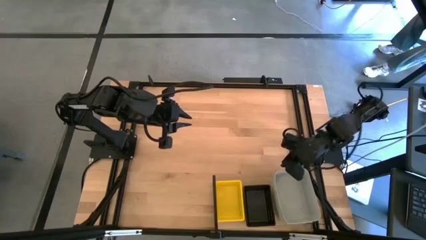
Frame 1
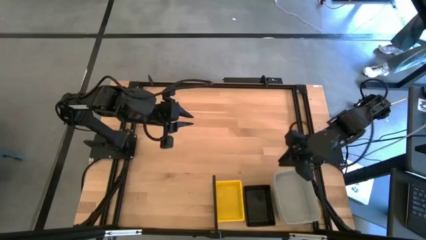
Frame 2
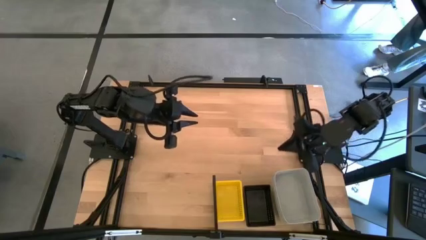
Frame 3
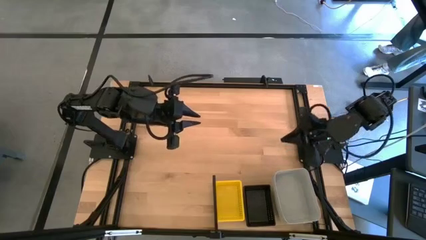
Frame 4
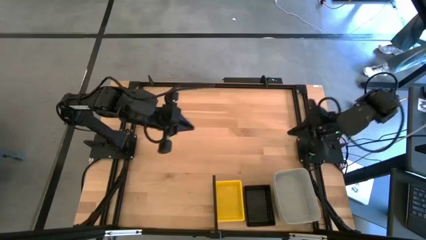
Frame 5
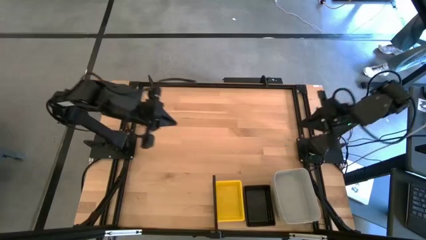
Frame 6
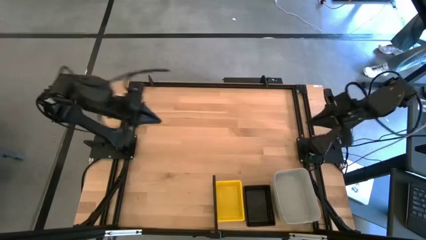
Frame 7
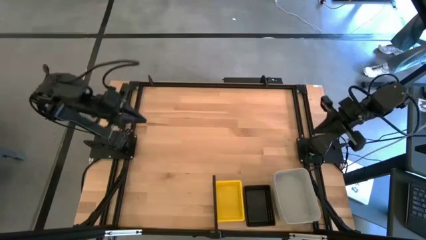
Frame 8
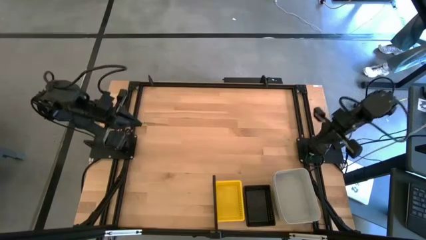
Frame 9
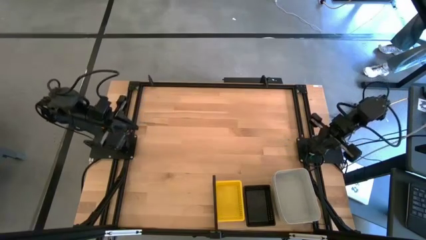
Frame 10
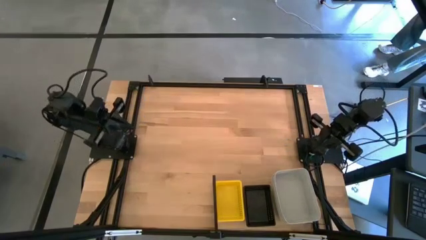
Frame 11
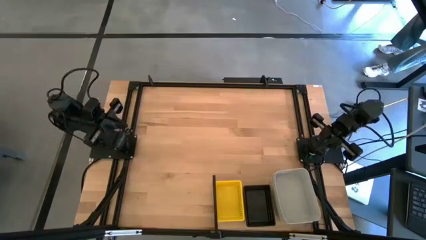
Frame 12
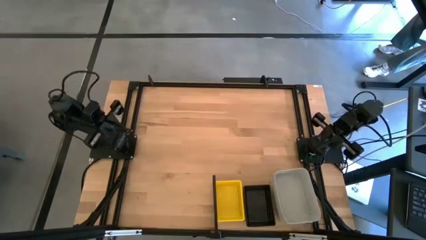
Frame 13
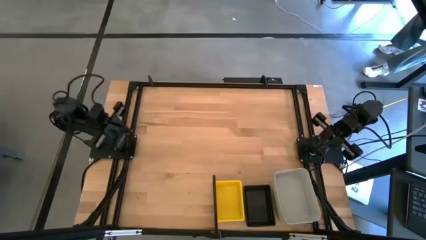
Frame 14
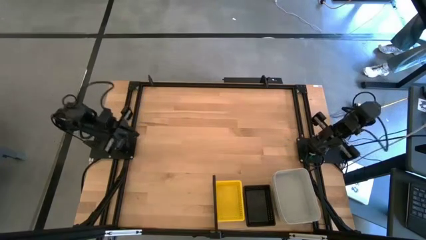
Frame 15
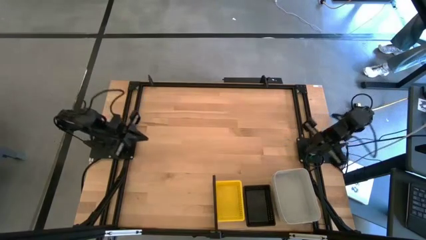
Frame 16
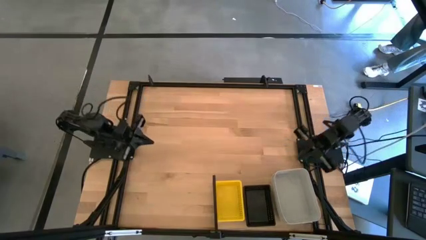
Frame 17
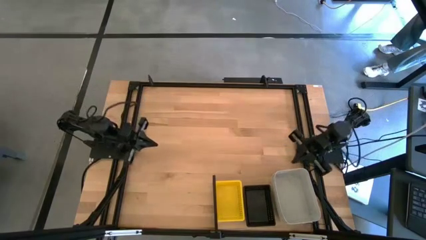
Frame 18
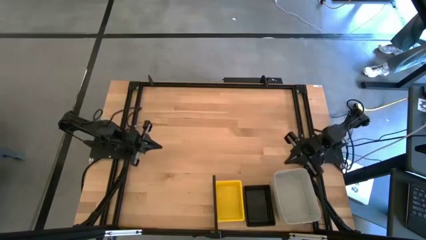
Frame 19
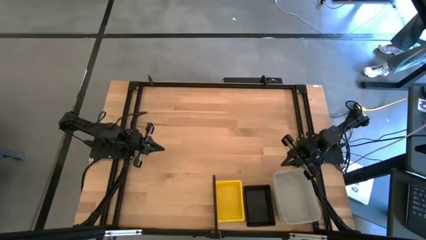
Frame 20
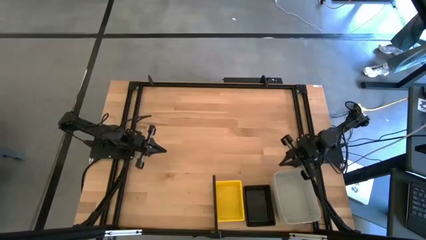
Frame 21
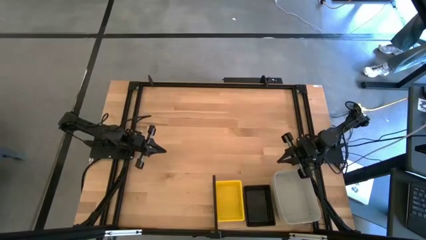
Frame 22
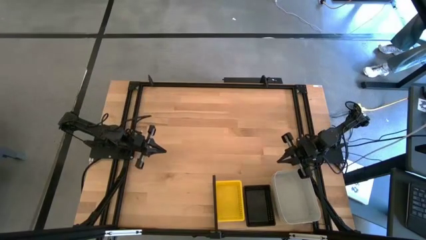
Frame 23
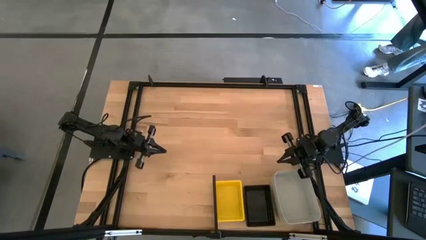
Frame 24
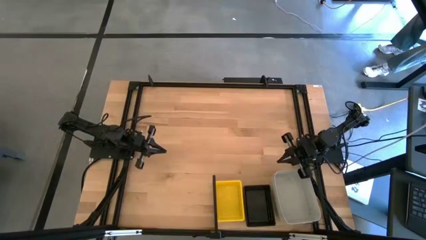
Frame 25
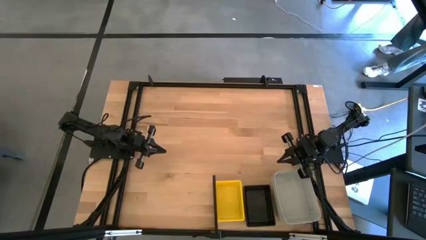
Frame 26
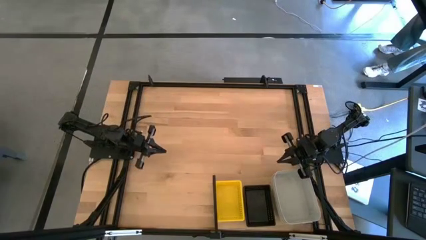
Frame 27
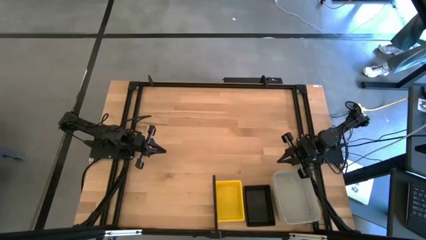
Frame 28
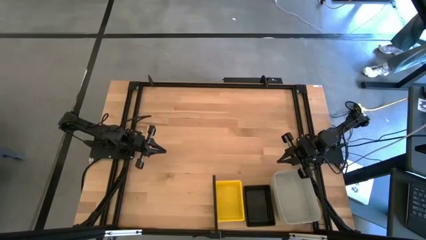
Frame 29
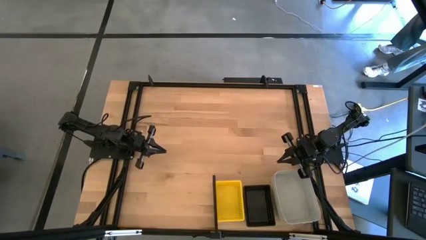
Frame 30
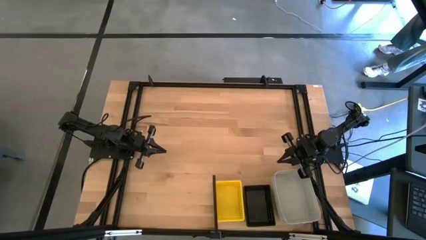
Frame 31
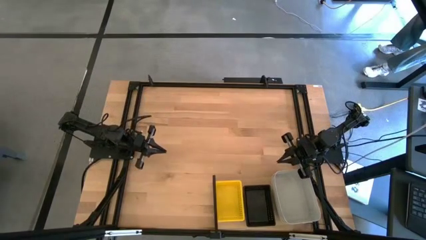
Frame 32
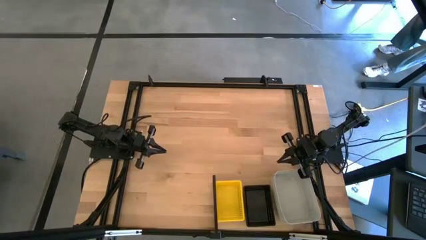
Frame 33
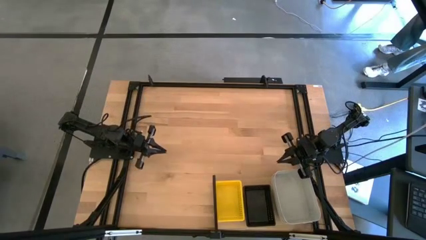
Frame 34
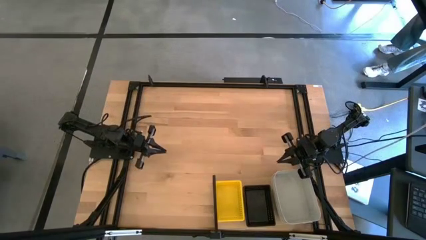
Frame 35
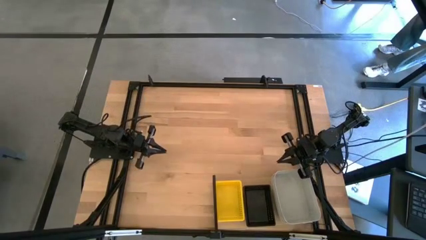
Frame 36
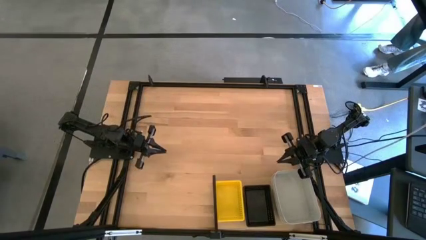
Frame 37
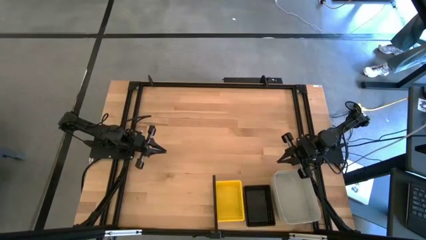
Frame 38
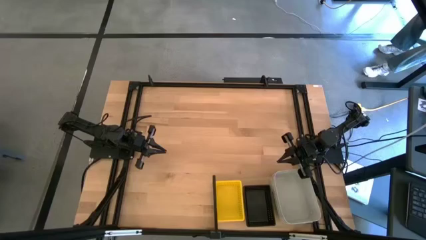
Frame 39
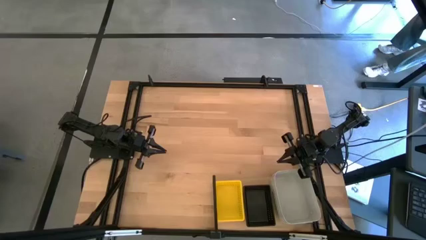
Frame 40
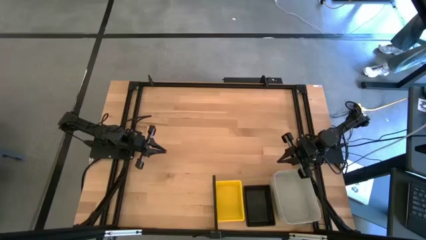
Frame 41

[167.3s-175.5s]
Task: Stack baskets on shelf by color
Return to Home Position

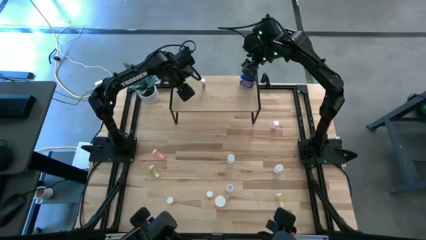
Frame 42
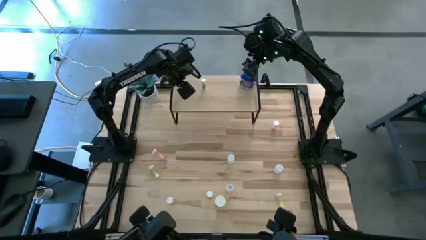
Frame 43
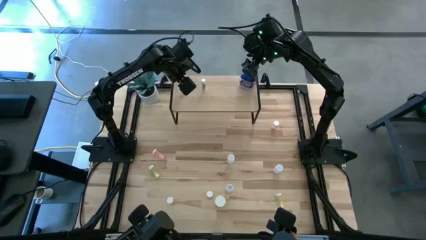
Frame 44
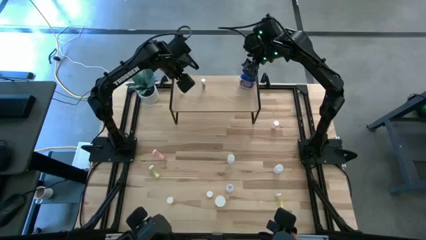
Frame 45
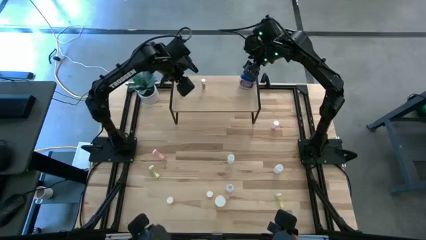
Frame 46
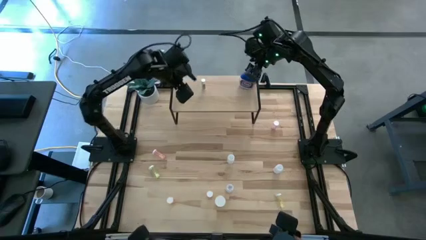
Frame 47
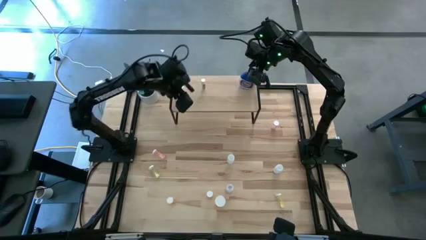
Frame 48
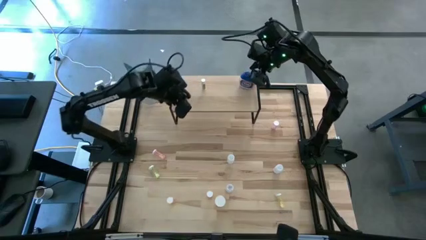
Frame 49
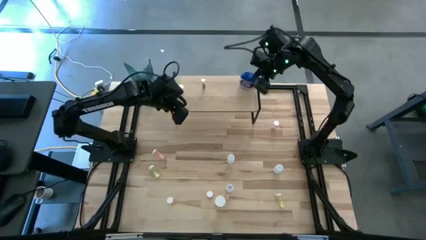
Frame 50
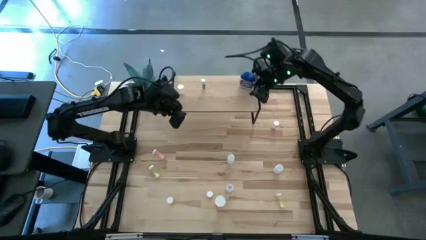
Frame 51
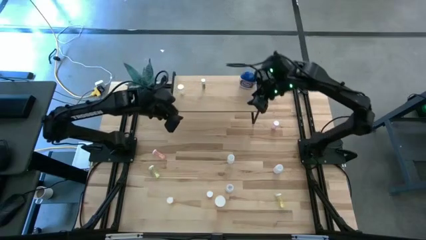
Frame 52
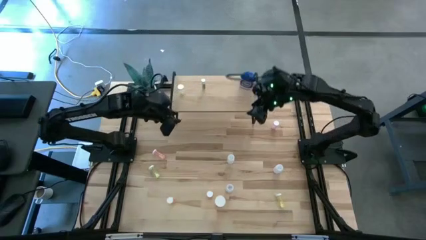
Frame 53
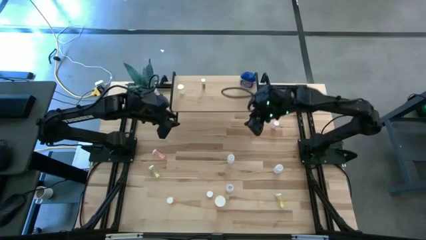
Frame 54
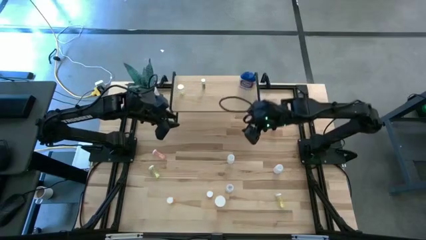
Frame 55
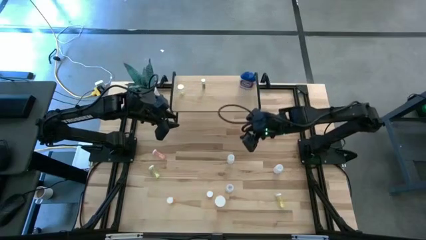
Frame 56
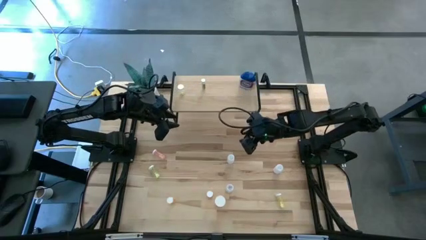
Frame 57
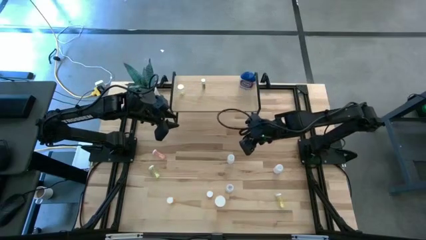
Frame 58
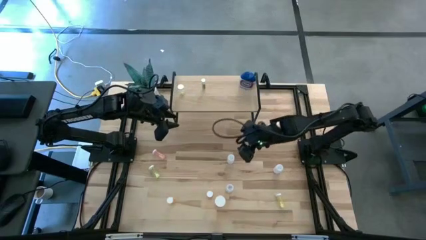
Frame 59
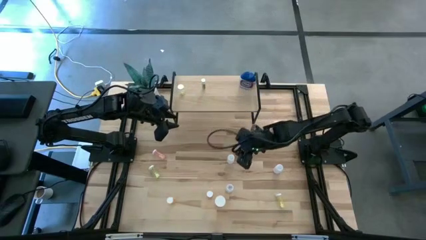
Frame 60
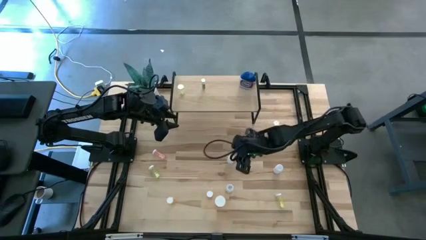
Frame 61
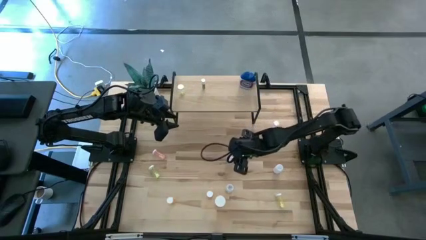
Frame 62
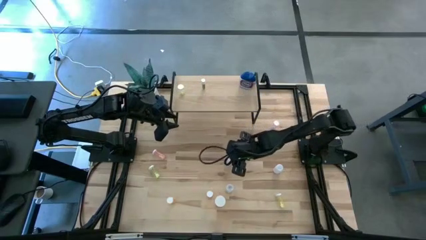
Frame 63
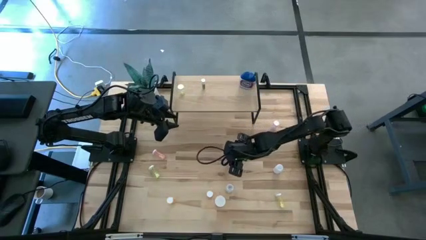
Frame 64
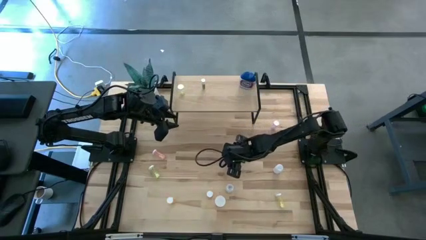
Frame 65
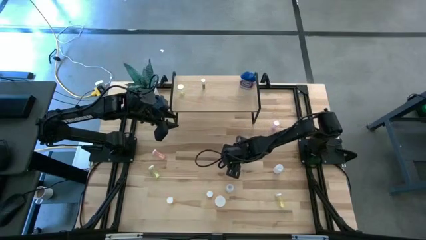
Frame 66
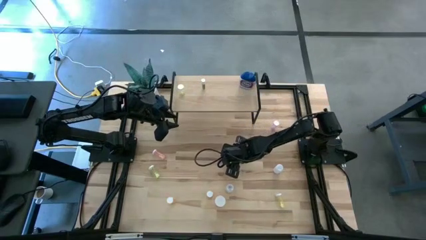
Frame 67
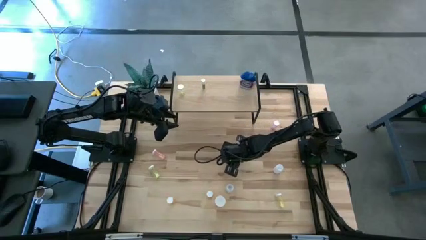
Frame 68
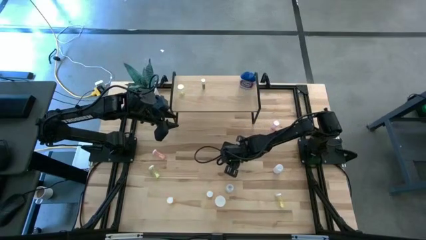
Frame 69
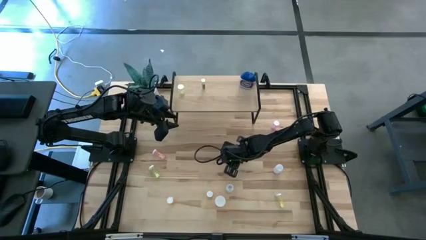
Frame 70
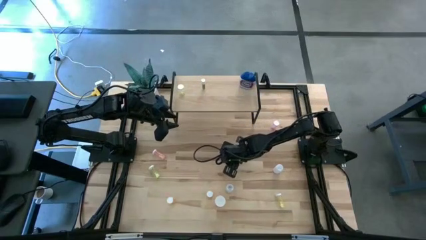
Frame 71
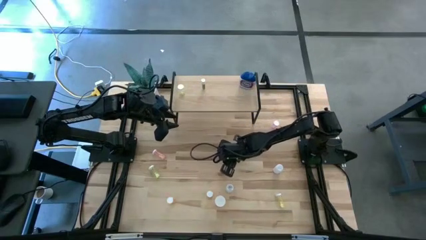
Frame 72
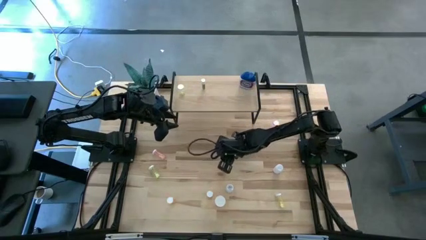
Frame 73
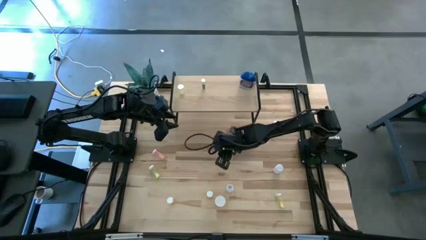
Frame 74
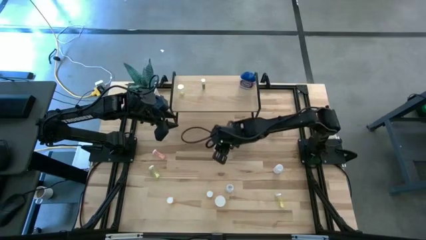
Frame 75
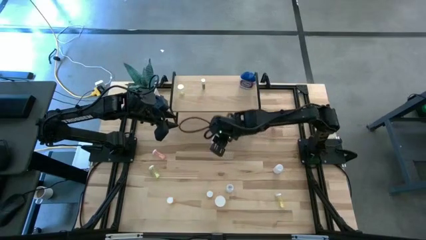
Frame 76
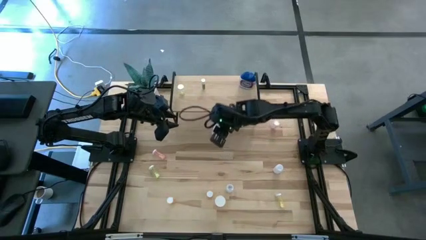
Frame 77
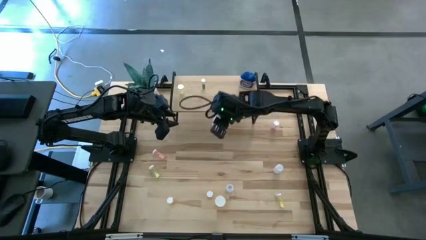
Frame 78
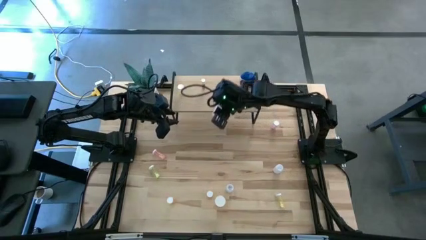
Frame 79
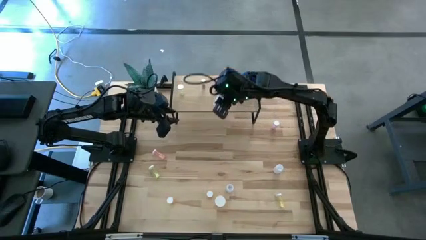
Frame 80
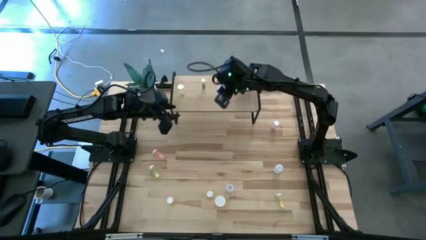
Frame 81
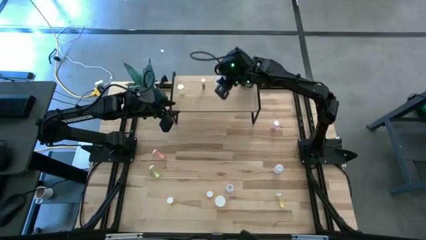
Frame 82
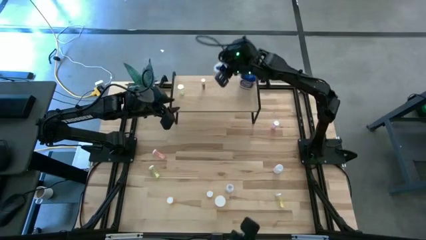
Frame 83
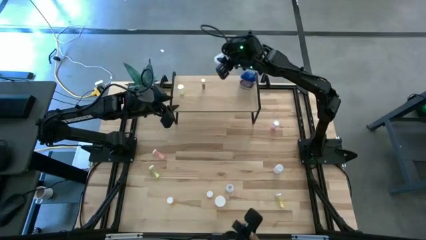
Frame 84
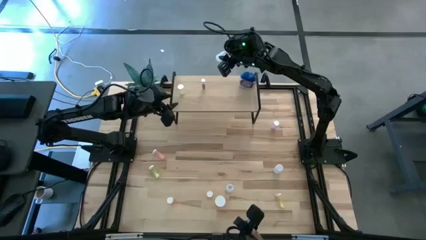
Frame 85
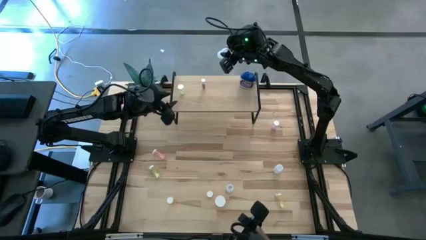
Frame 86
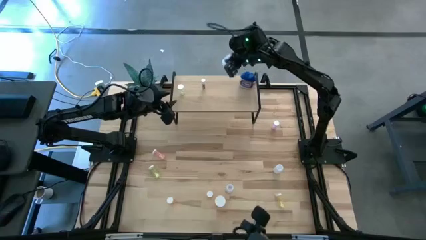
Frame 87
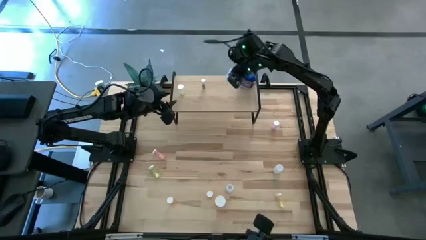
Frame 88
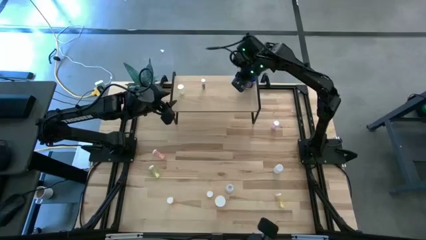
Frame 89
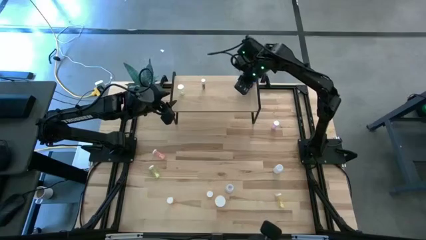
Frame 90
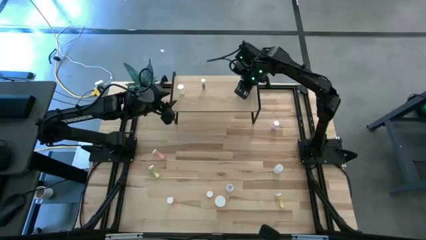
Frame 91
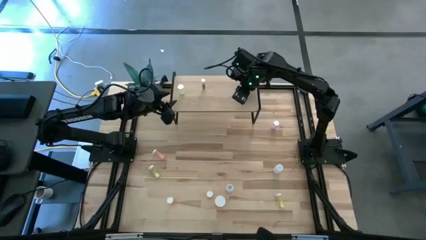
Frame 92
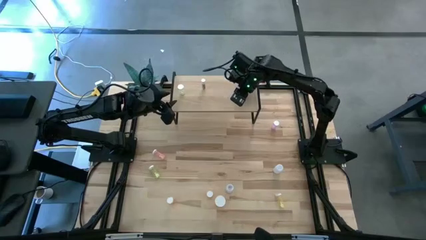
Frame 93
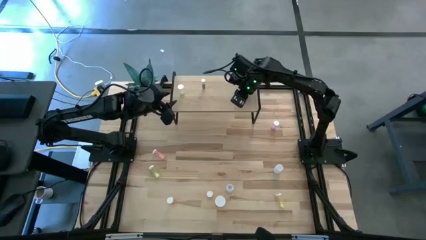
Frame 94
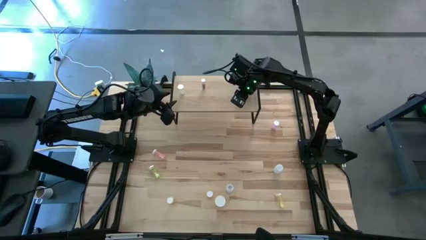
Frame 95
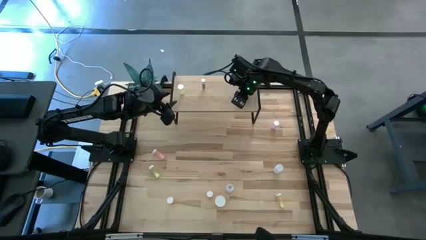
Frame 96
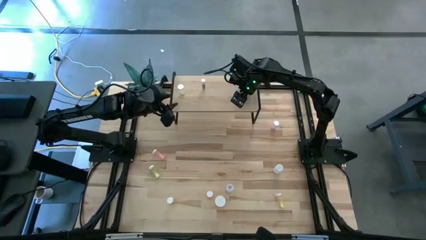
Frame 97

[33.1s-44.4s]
Task: Pick and place medicine bottles onto shelf by color
Put the top white pill bottle on the shelf
